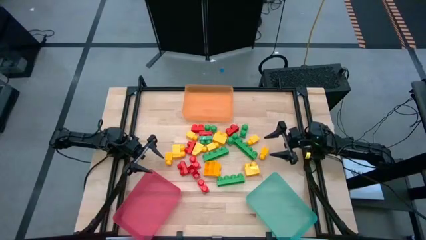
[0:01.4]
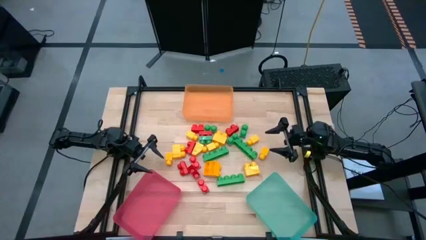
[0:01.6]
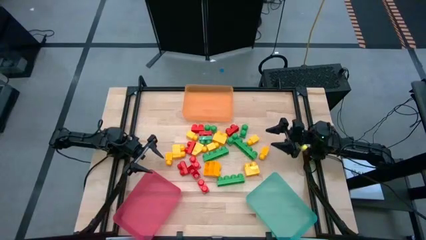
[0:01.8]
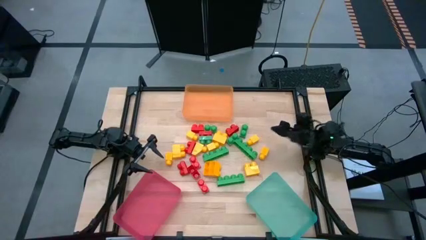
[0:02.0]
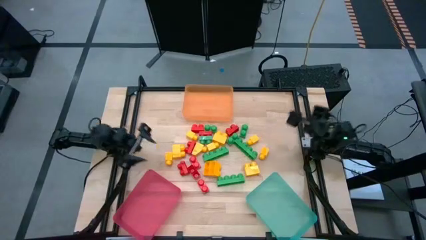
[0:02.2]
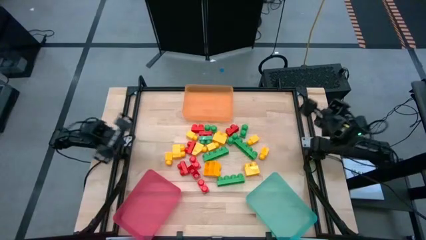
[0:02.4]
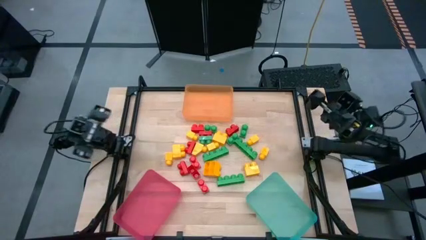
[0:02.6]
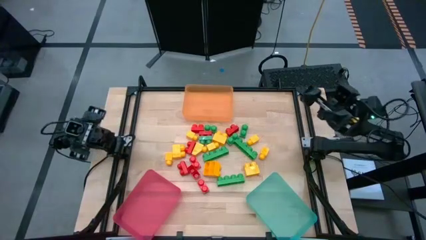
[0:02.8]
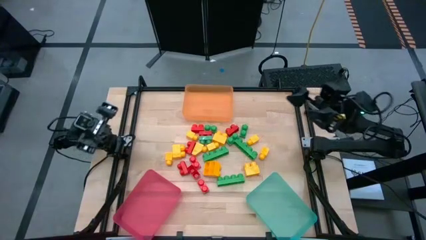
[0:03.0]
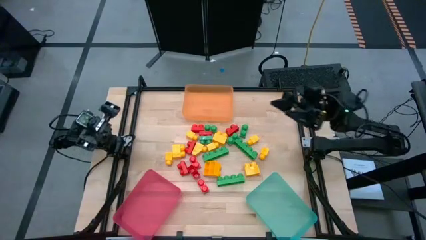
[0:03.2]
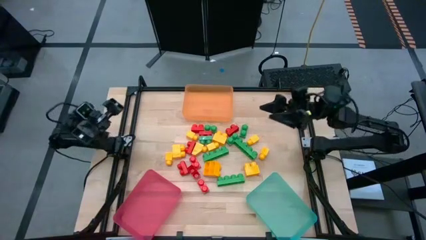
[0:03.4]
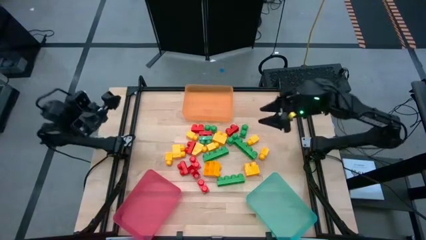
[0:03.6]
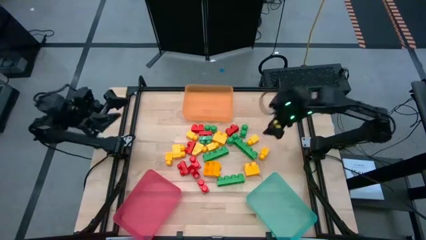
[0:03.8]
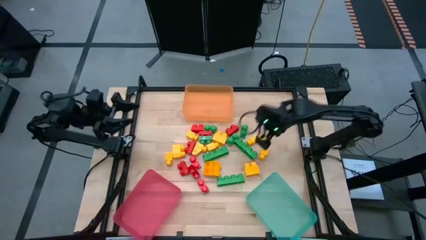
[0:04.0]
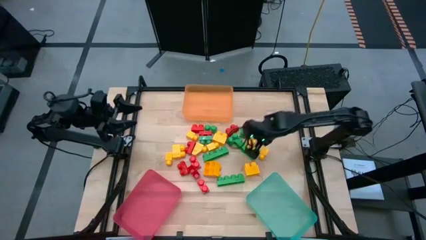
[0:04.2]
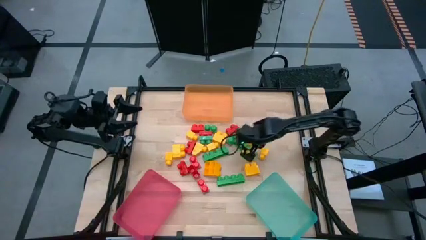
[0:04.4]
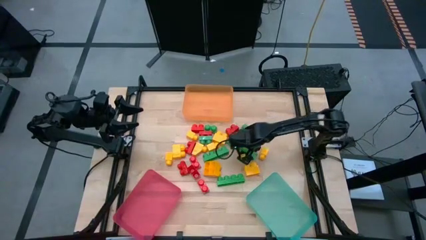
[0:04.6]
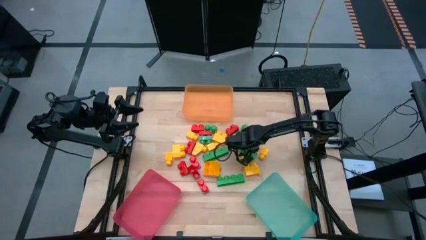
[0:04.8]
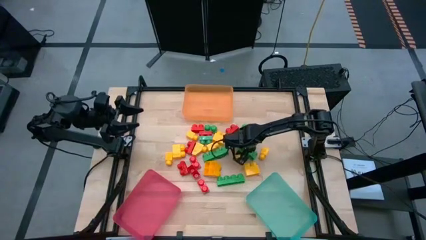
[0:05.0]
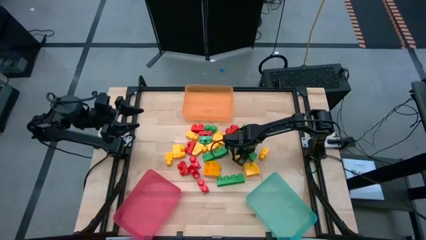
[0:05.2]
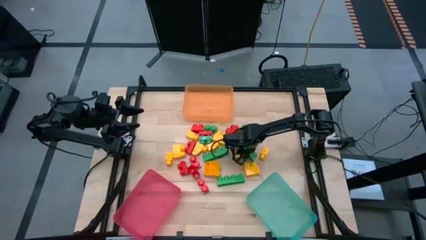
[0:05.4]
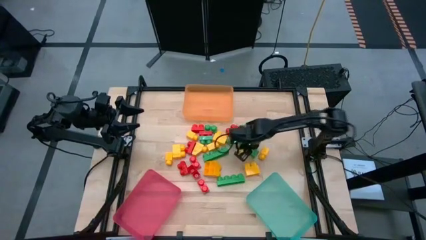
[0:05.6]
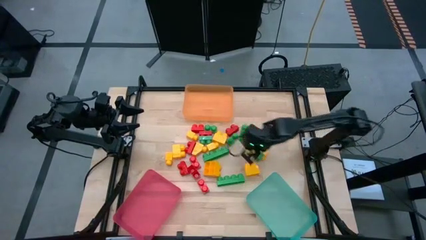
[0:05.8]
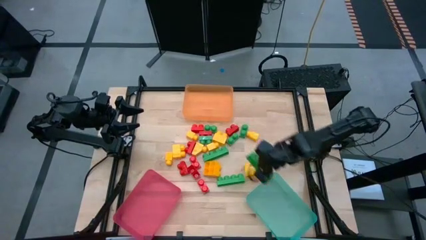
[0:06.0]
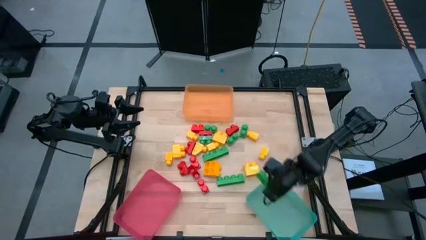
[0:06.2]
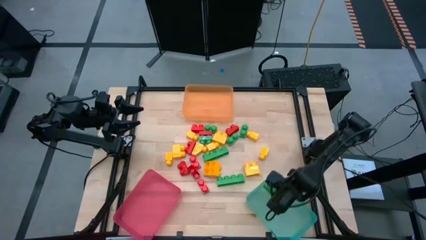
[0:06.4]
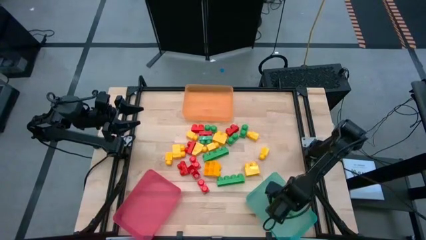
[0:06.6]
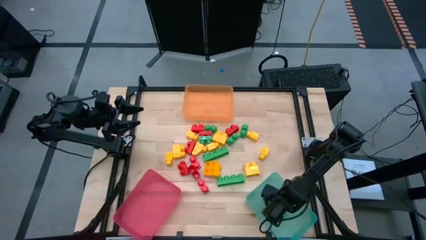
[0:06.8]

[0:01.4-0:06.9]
Task: Sort blocks
Put the green 4 stud game piece into the light green bin

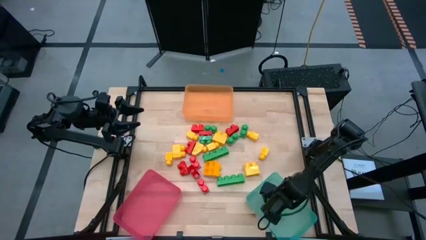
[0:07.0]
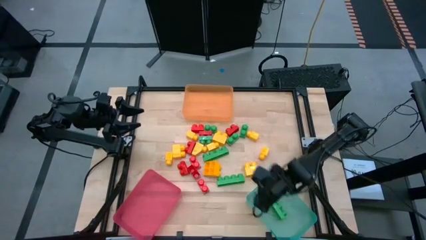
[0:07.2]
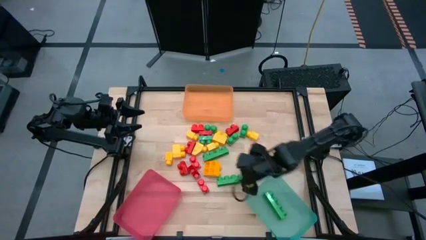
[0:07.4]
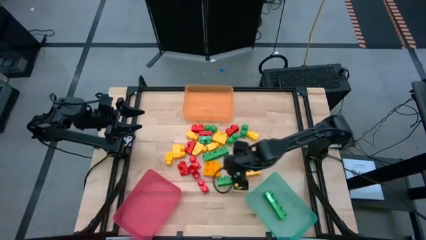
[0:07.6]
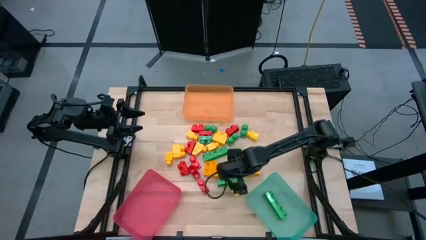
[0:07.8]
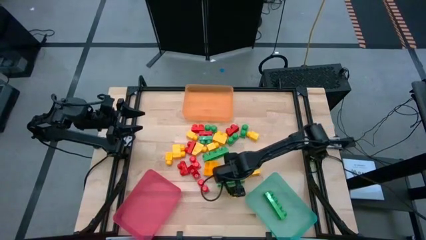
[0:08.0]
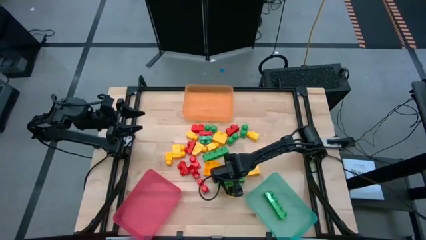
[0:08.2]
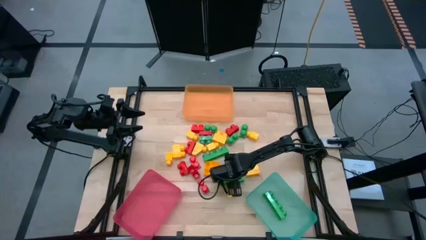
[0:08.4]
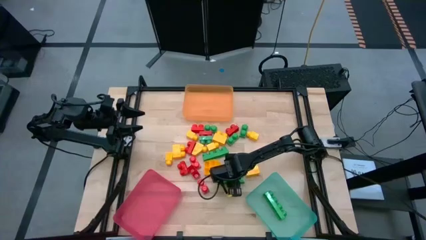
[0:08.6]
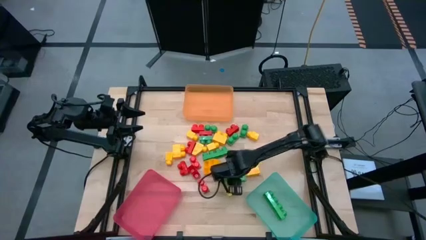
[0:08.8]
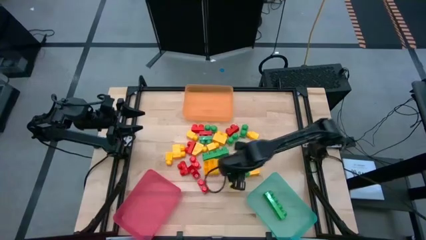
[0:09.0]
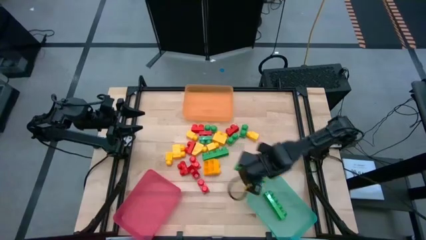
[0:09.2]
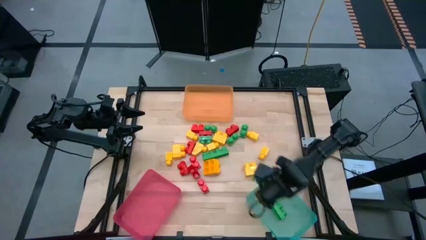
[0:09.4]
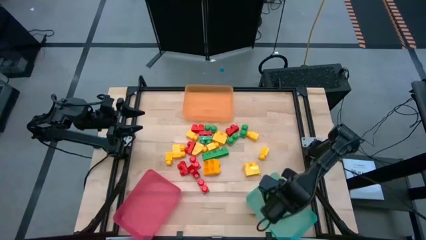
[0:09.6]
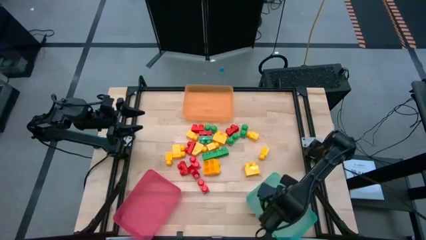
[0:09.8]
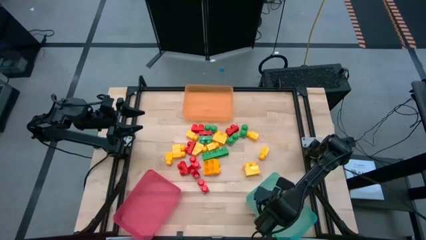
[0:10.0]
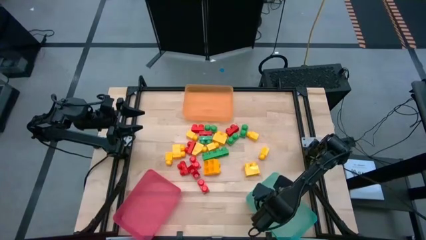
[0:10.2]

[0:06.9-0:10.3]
Put the green 4 stud game piece into the light green bin

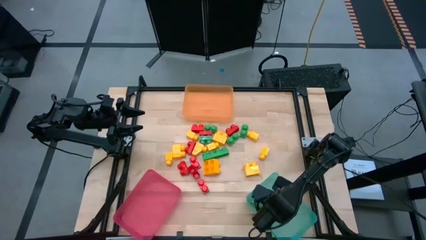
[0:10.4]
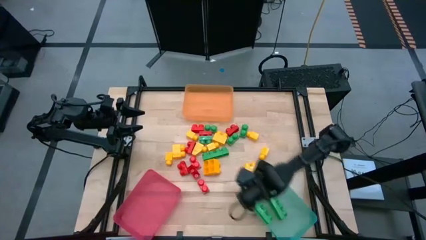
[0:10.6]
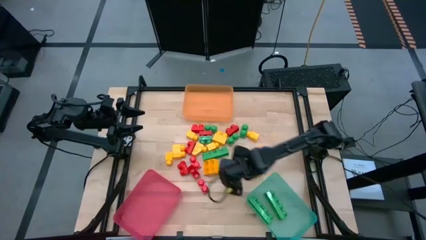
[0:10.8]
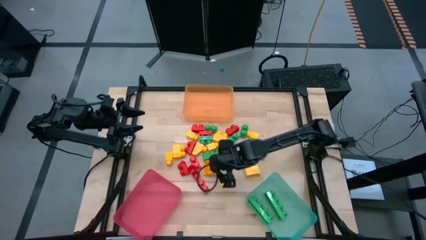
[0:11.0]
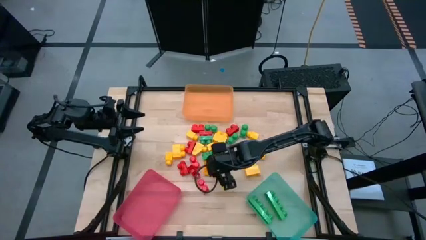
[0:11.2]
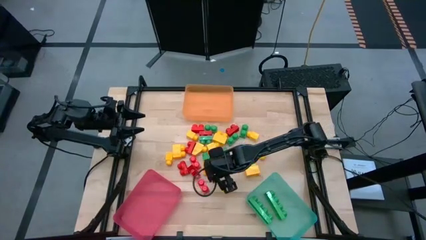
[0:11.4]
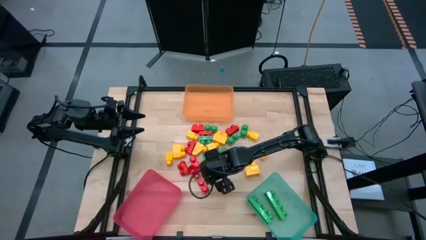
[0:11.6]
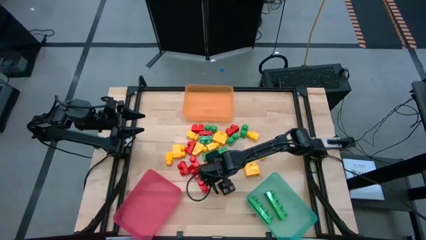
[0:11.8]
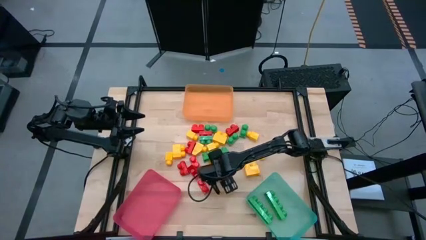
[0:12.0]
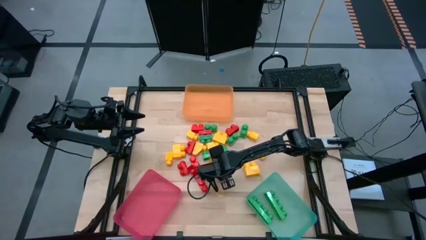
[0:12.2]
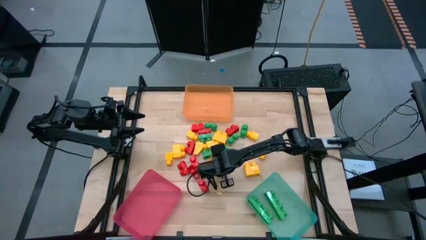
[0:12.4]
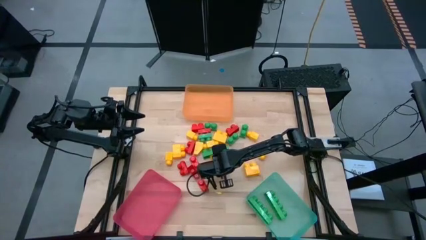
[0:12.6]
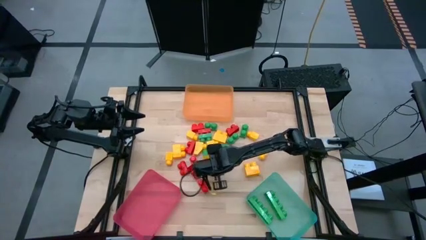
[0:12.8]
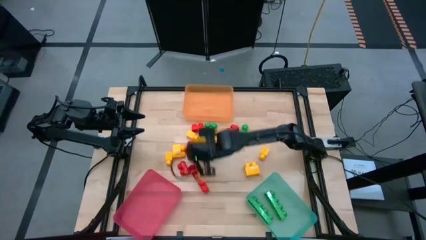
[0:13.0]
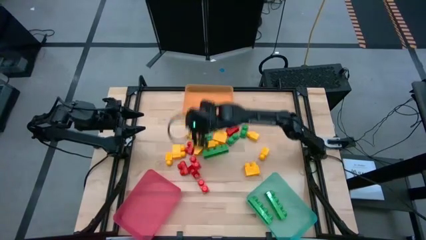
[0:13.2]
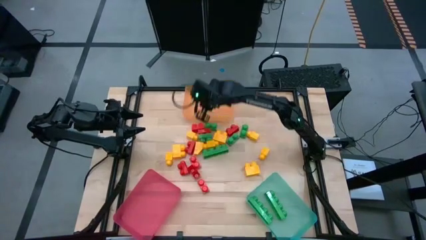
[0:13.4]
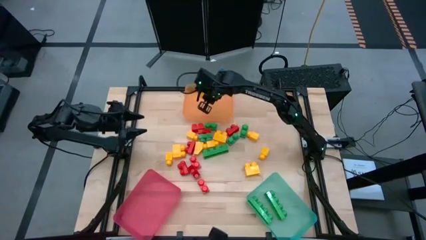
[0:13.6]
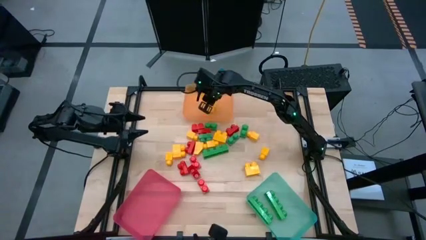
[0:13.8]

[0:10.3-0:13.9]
Put the yellow 2 stud game piece into the orange bin

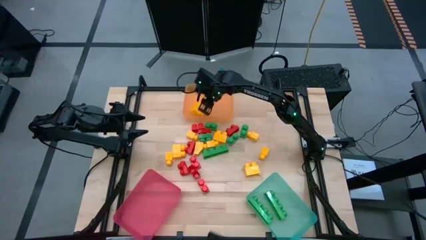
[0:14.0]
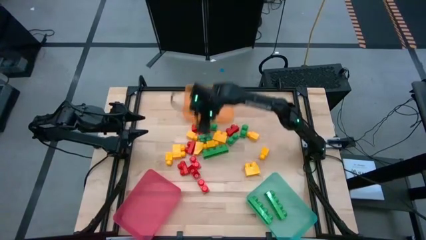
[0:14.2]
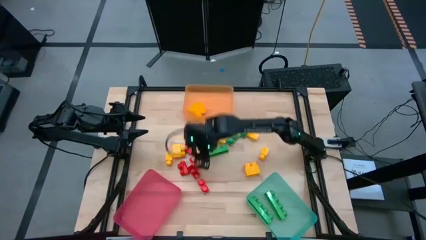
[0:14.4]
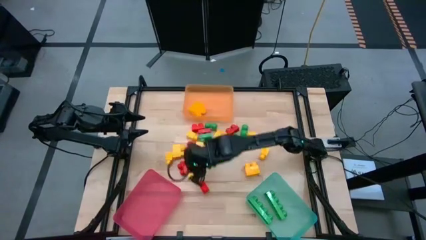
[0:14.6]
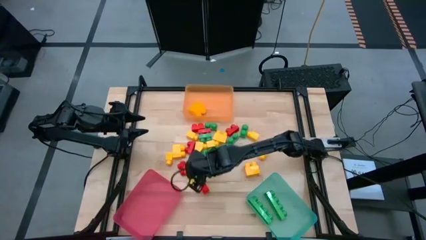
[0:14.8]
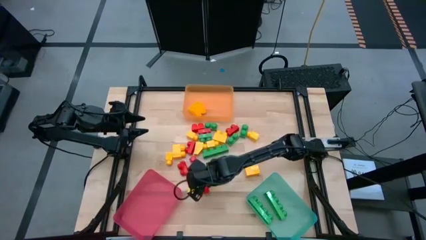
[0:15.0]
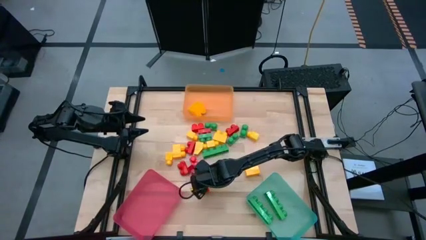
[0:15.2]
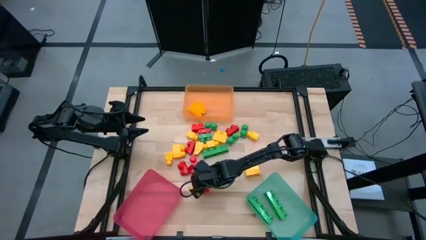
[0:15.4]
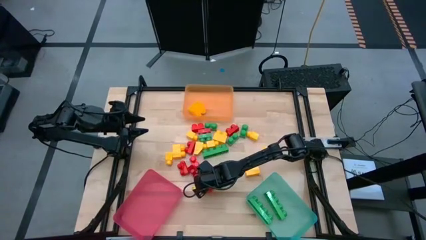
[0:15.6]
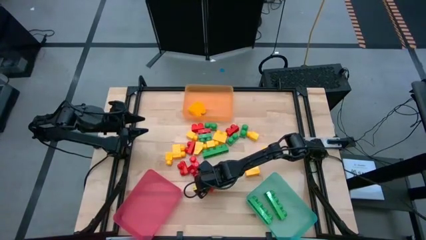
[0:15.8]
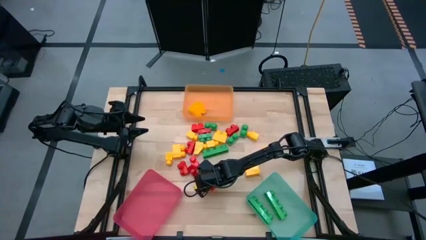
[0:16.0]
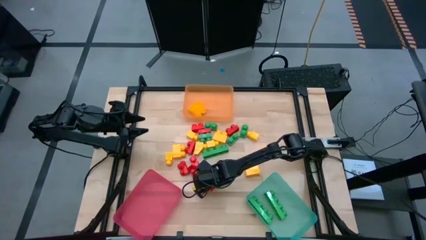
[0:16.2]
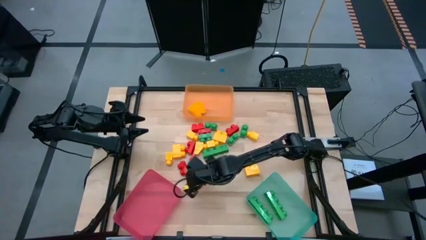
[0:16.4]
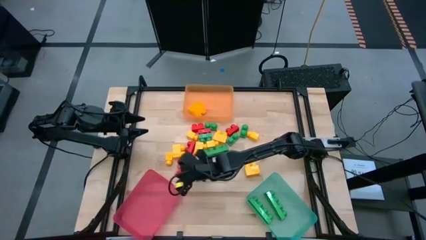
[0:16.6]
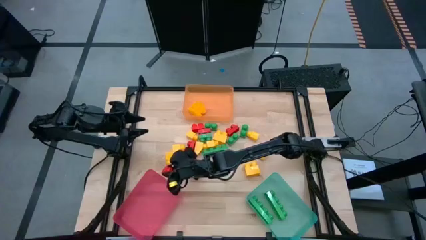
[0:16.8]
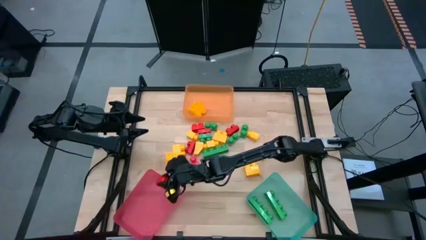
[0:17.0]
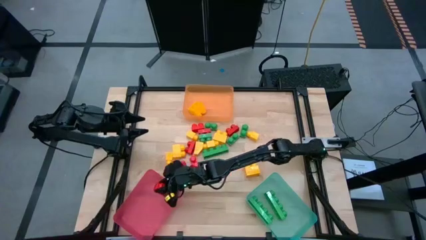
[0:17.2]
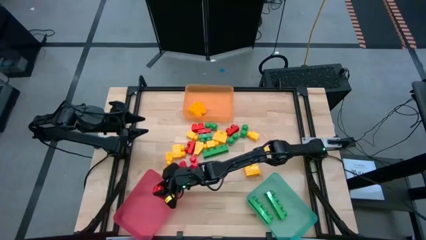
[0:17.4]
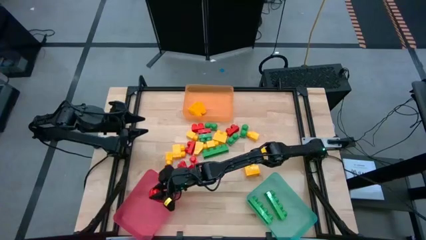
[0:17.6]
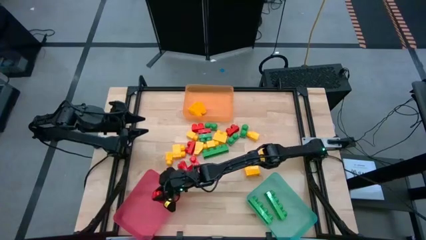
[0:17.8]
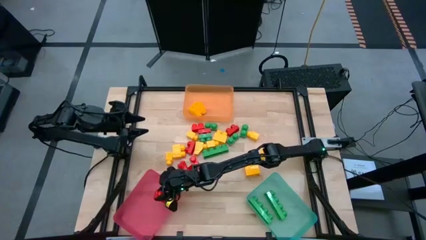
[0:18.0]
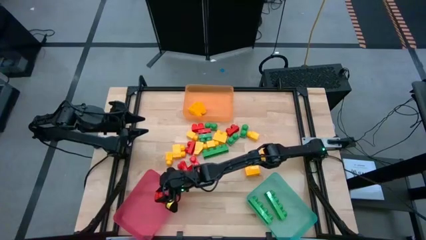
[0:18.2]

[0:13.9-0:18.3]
Put the red 2 stud game piece into the pink bin
